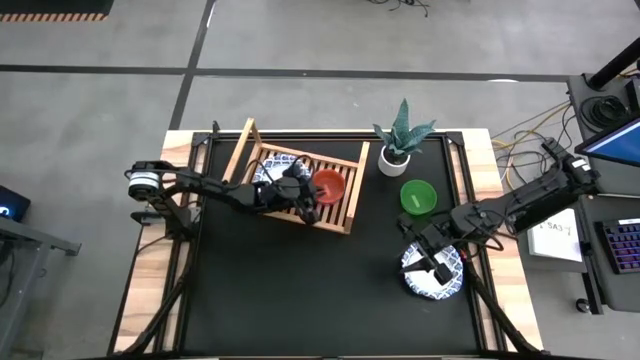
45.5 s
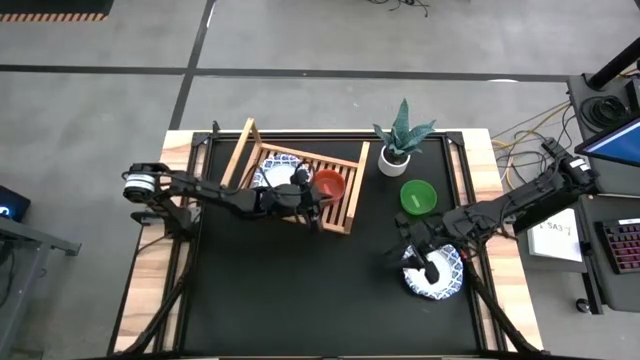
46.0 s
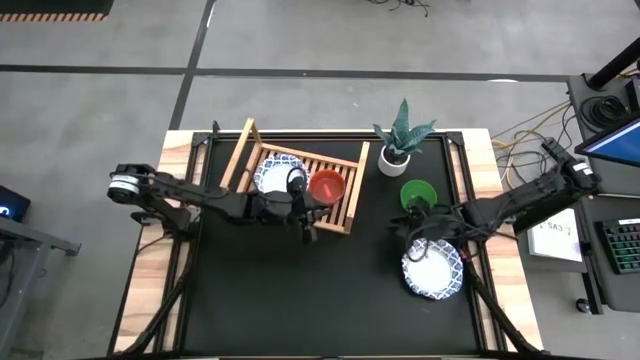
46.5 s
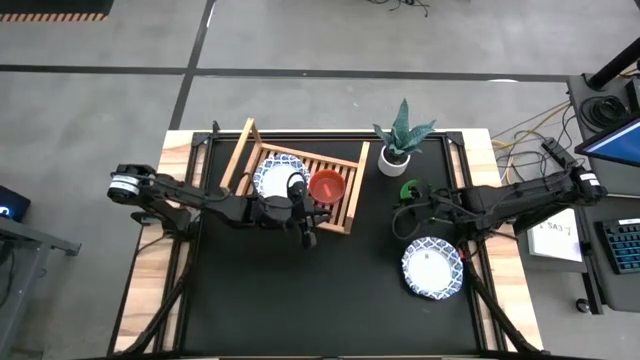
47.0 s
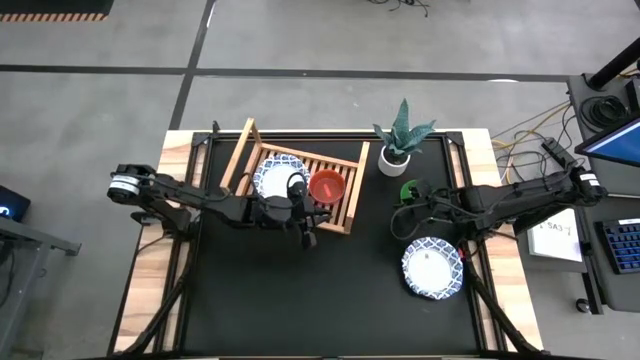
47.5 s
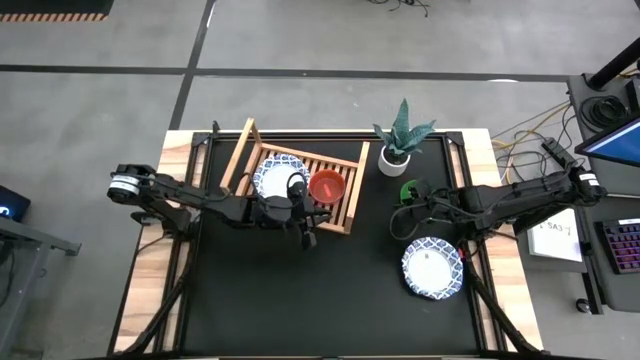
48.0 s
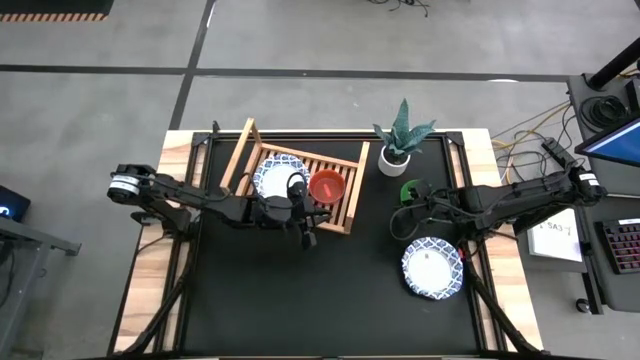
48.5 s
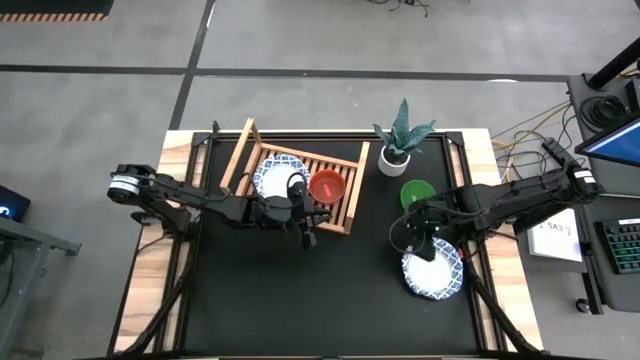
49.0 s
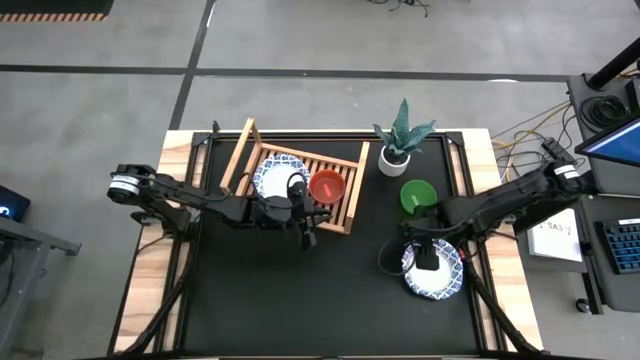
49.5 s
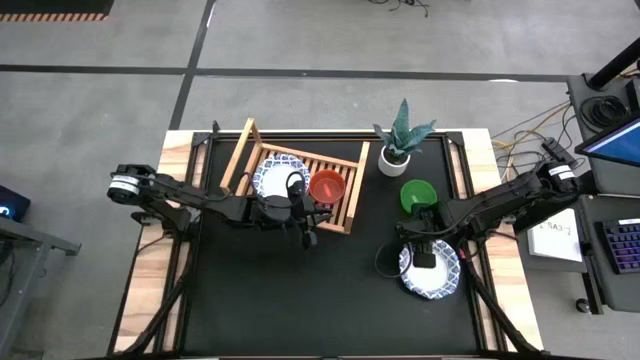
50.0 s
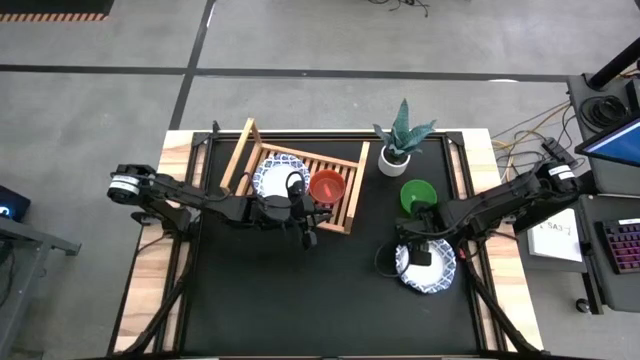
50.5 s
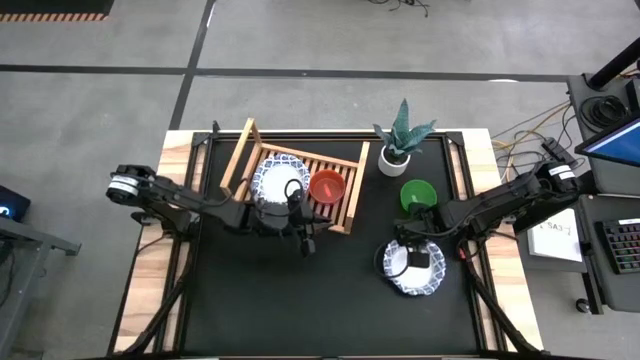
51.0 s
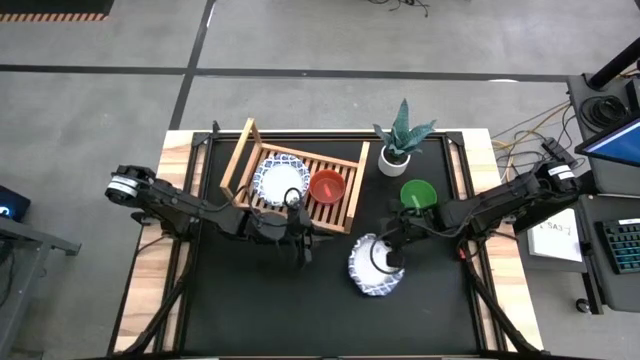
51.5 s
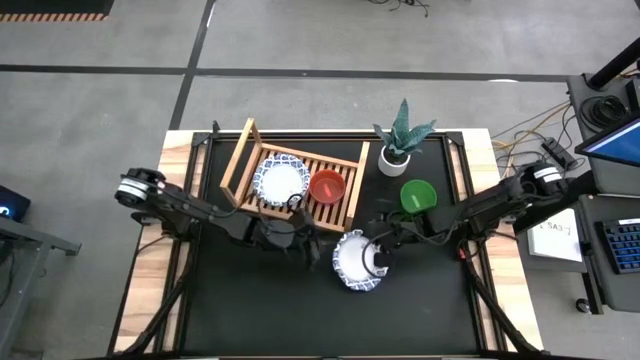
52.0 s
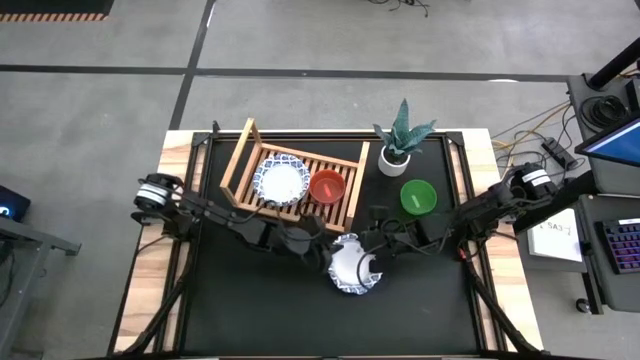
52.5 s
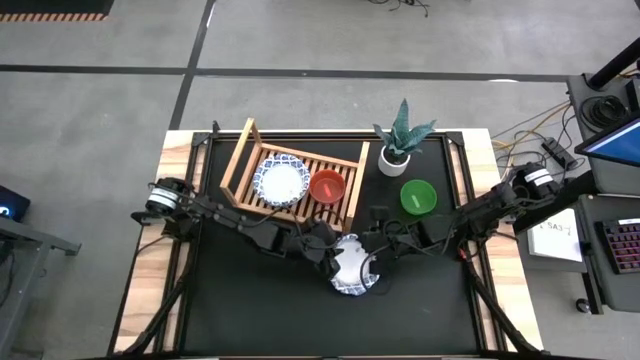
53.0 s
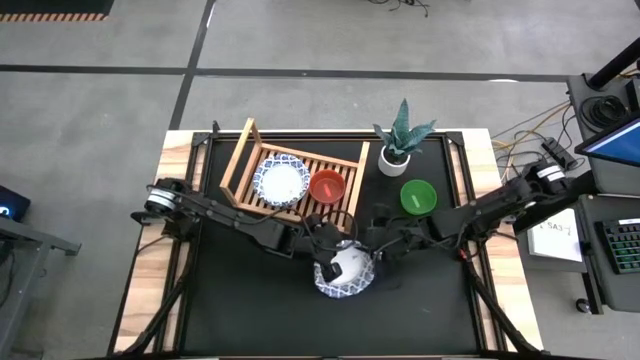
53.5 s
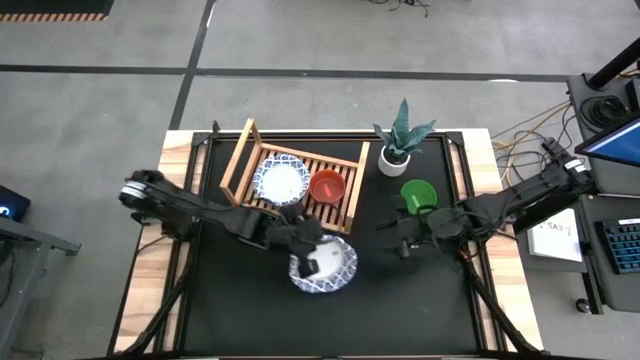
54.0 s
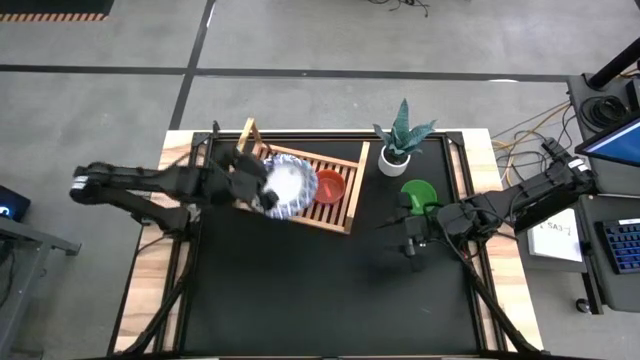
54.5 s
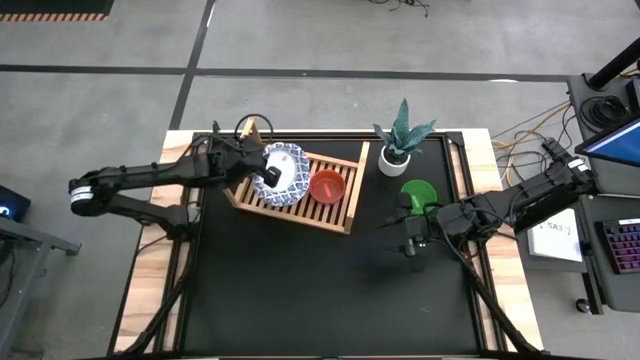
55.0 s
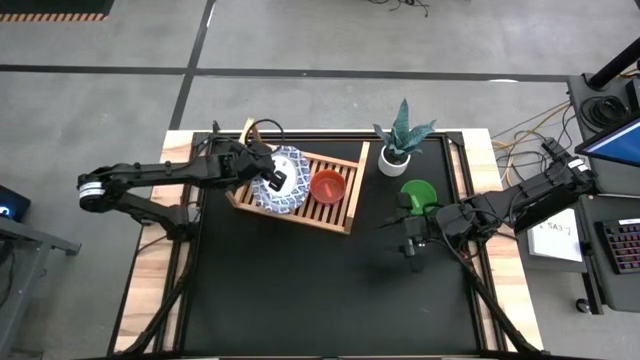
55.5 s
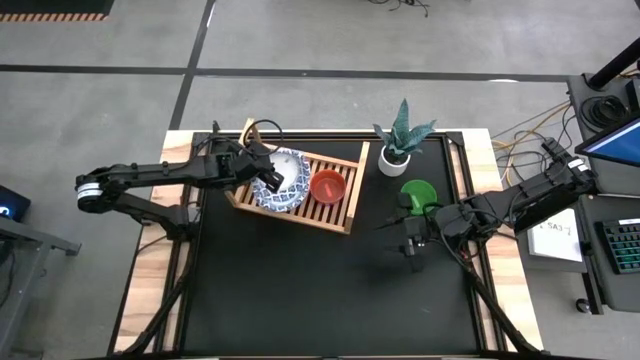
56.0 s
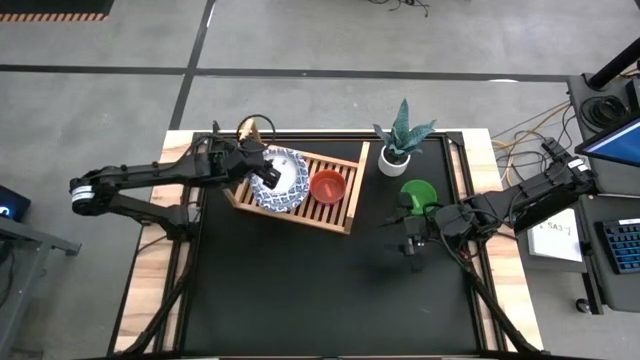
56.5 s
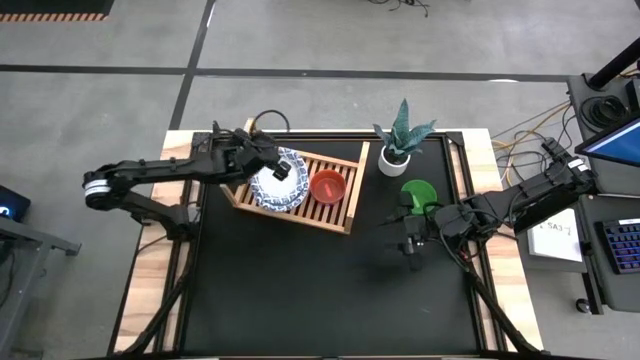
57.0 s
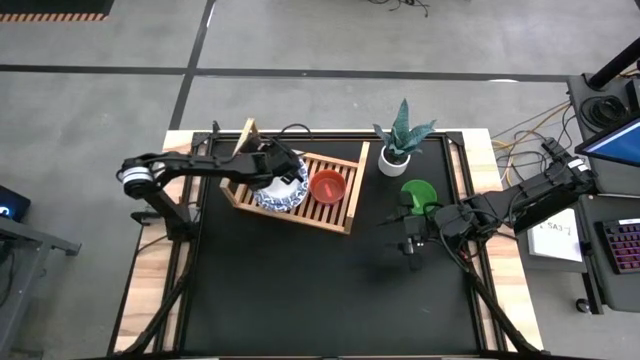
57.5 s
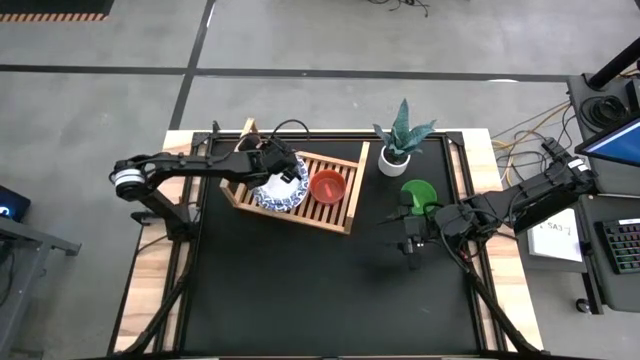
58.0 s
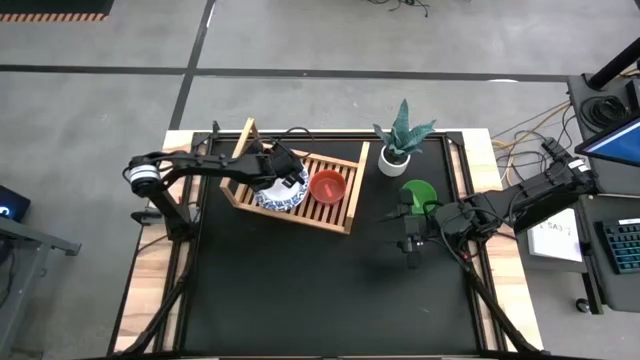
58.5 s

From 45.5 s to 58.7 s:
Task: Place and stack bowls onto a shelf
Stack the white patterned bowl on the white patterned bowl on the shelf

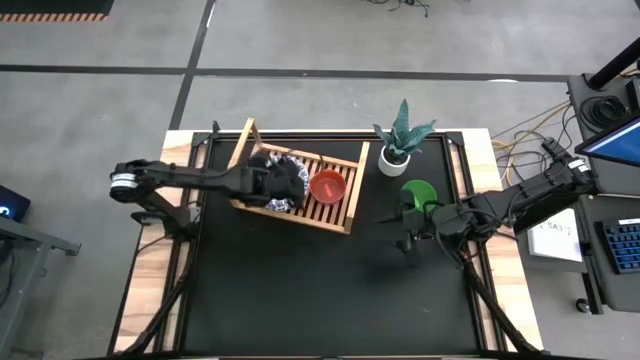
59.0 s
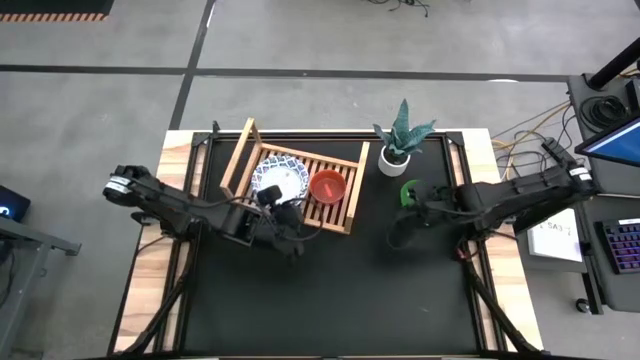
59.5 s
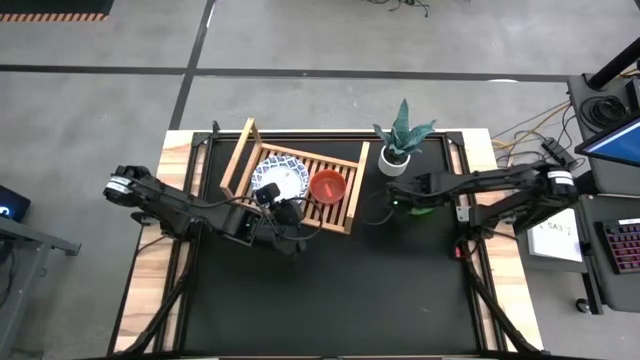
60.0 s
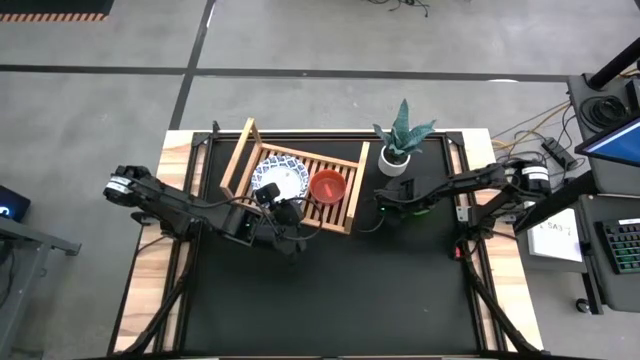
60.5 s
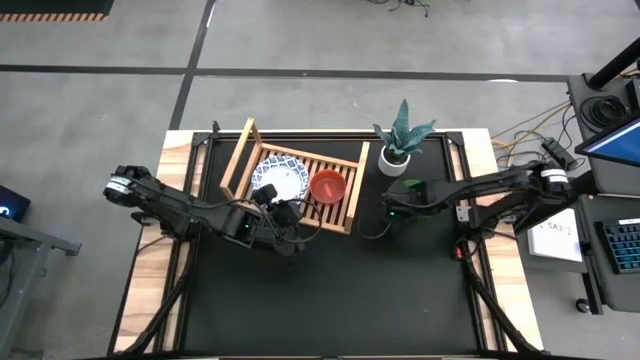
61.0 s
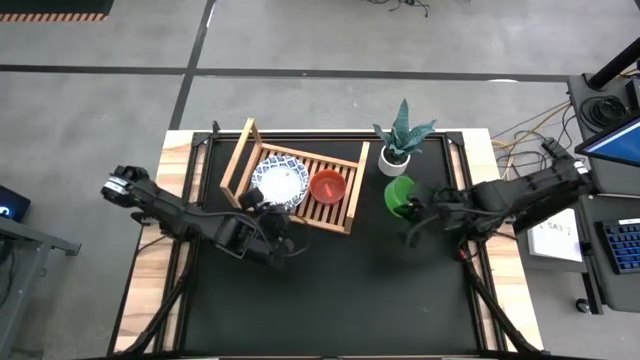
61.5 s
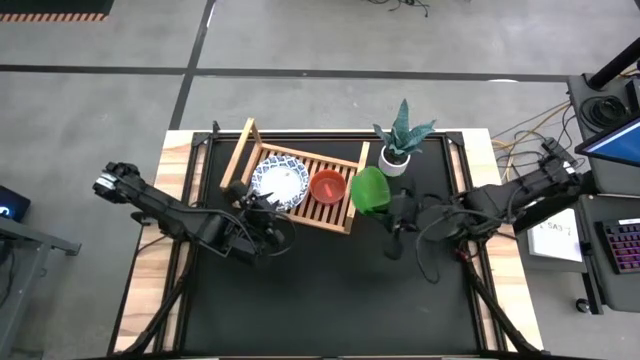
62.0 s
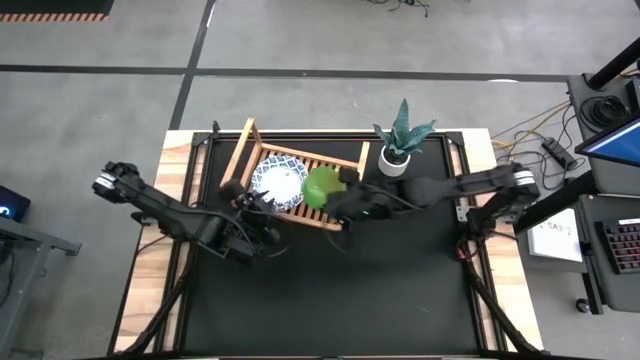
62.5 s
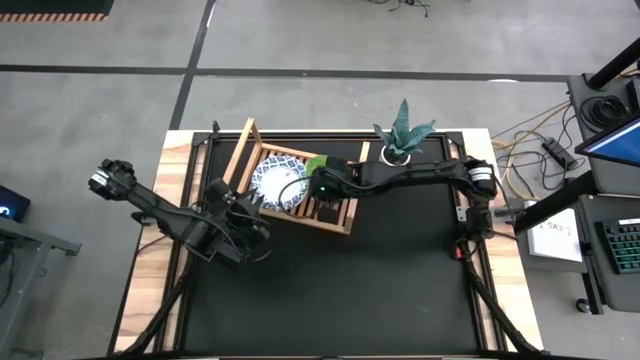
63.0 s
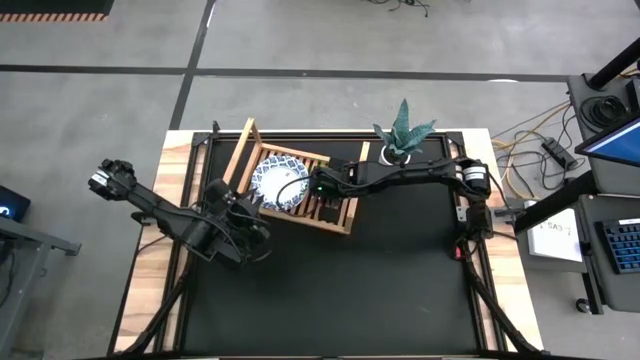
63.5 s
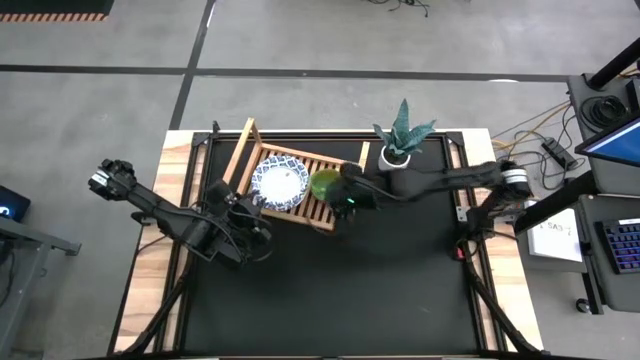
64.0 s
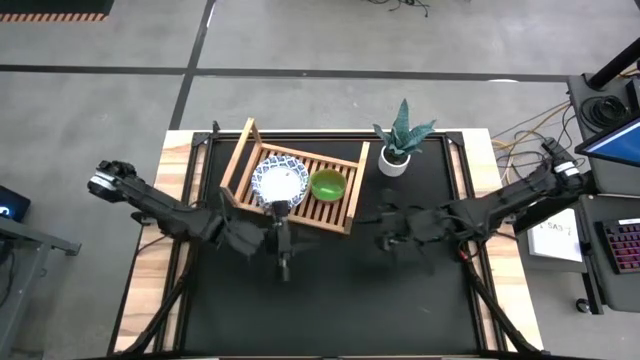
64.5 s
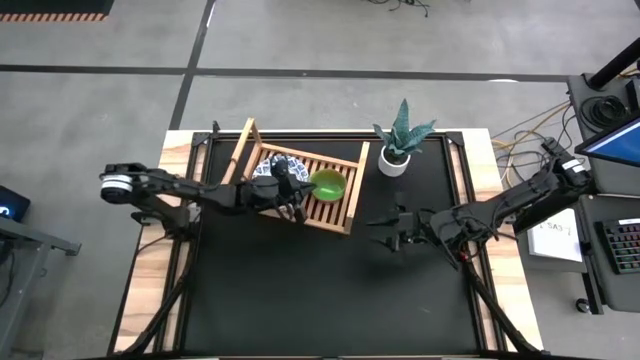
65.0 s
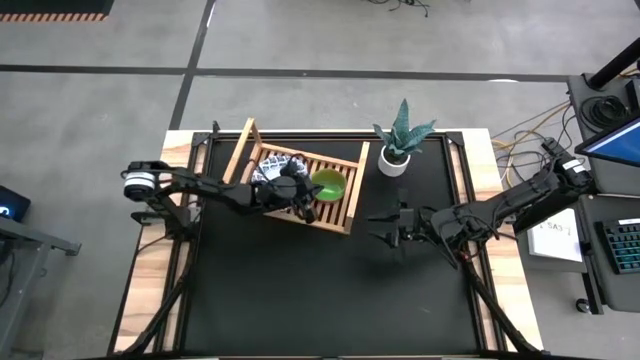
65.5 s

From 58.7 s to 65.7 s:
Stack the green bowl on the orange bowl on the shelf

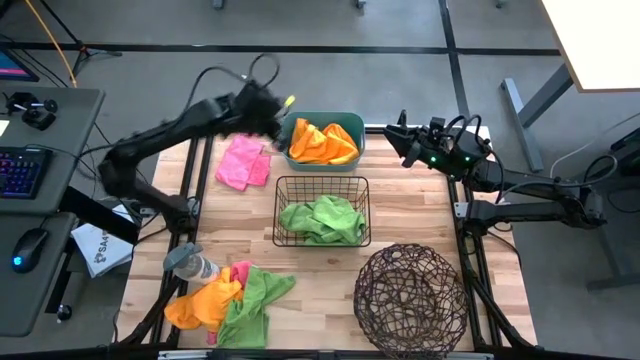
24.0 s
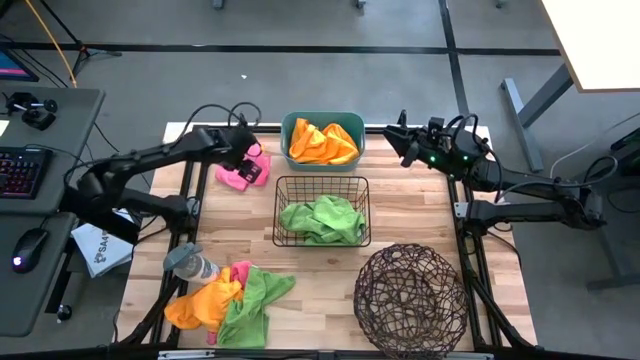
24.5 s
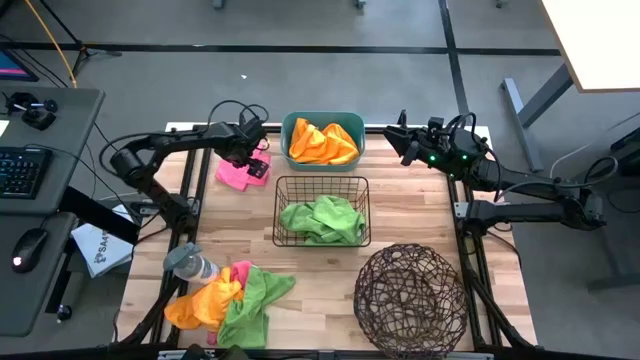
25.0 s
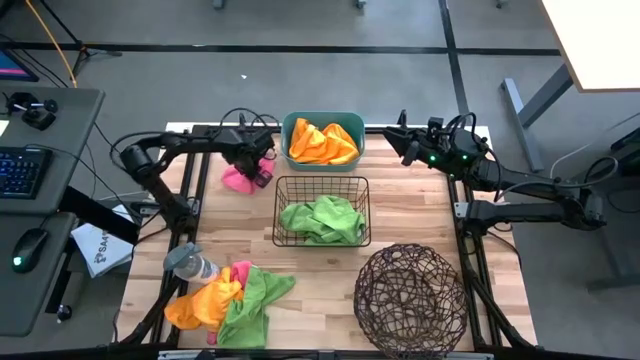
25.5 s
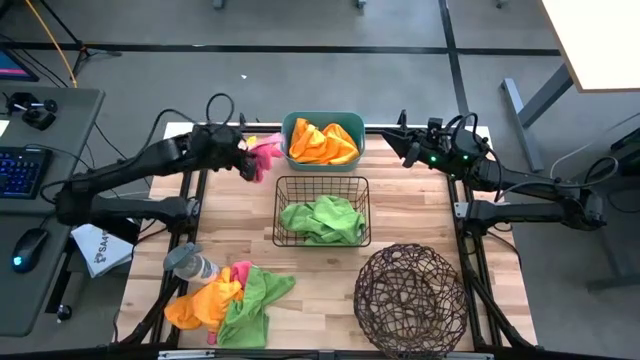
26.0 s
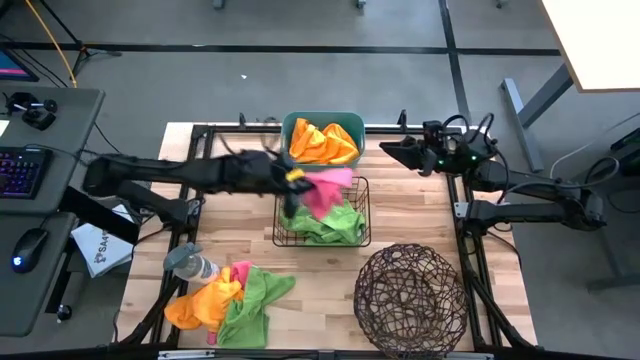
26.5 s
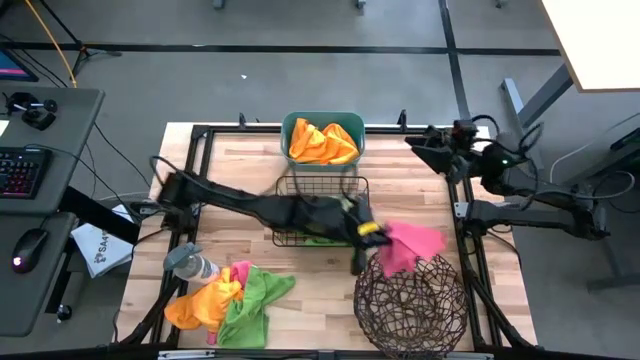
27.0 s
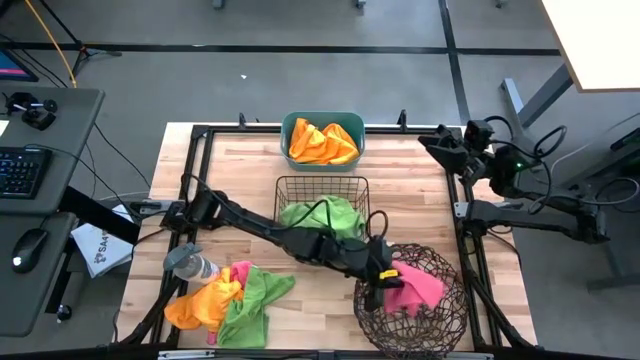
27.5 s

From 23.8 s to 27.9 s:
Task: Sort microfiber towel by color & place in baskets
Put the top pink microfiber cloth into the black wicker basket
